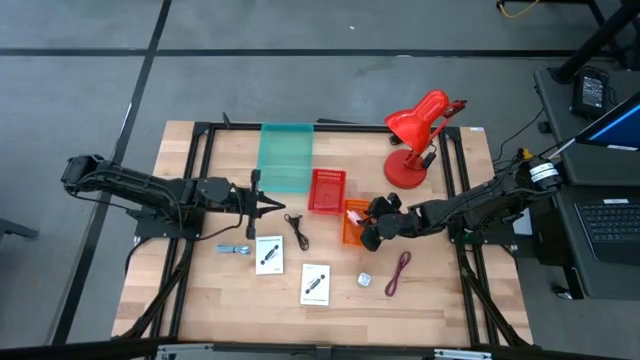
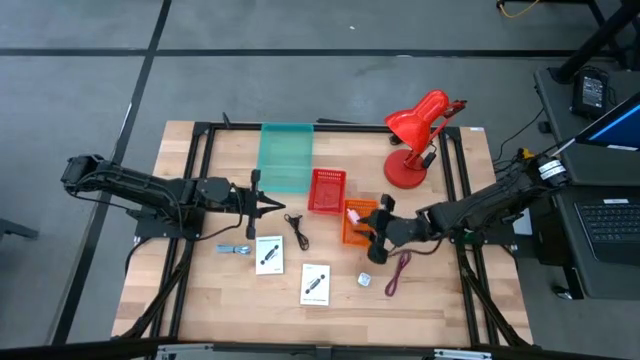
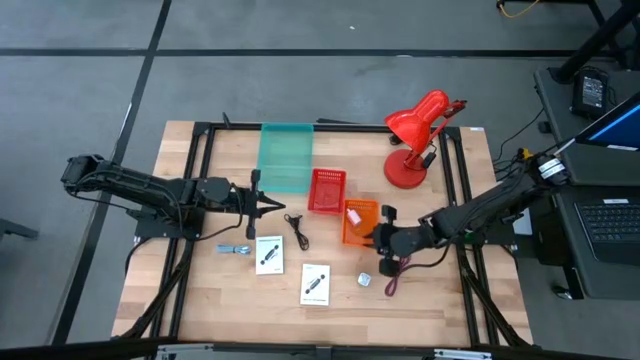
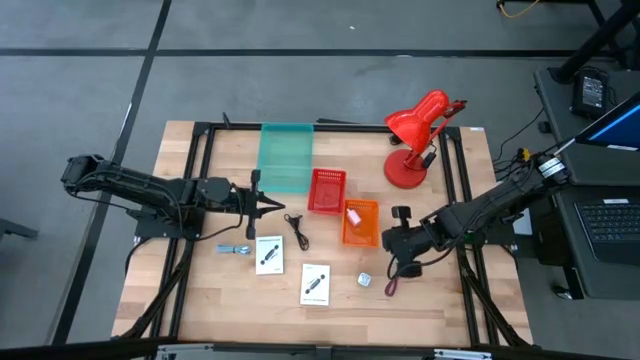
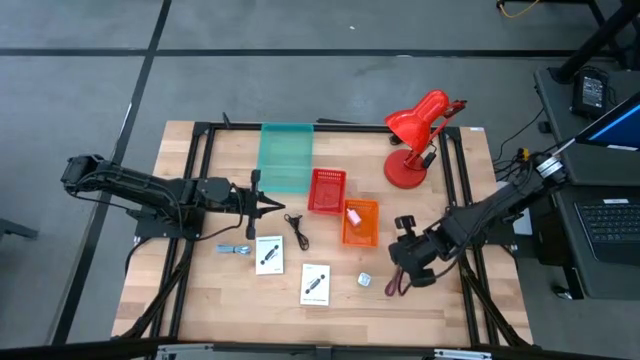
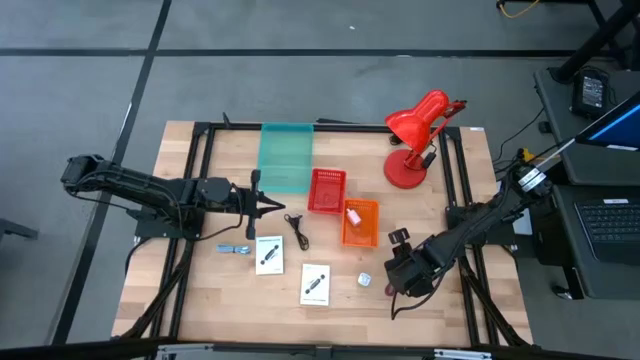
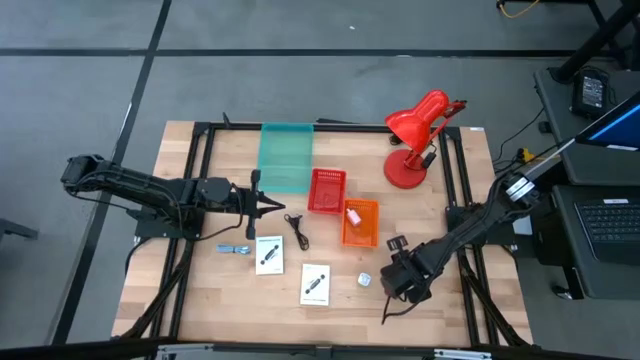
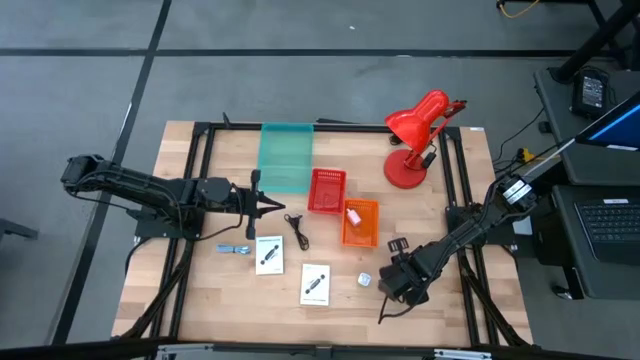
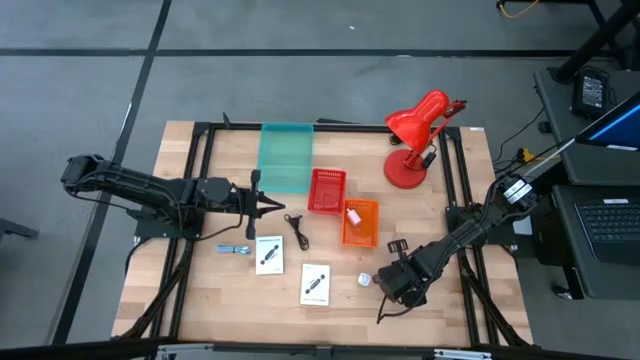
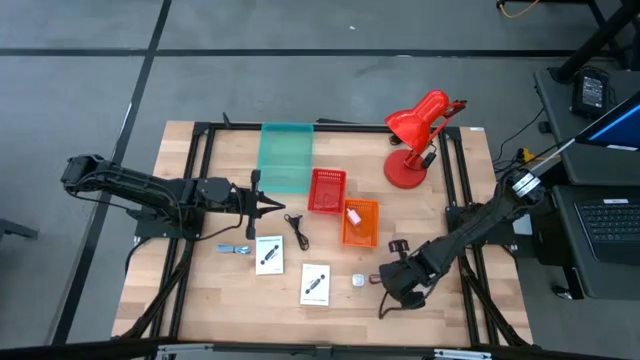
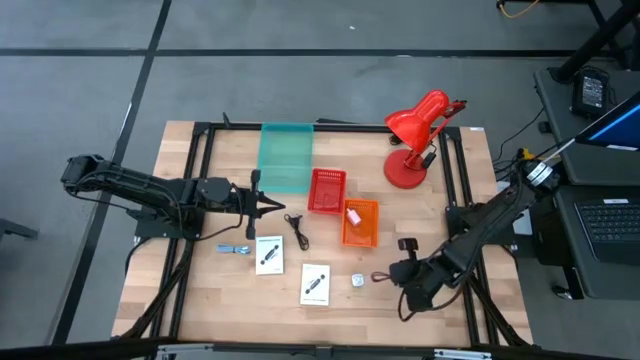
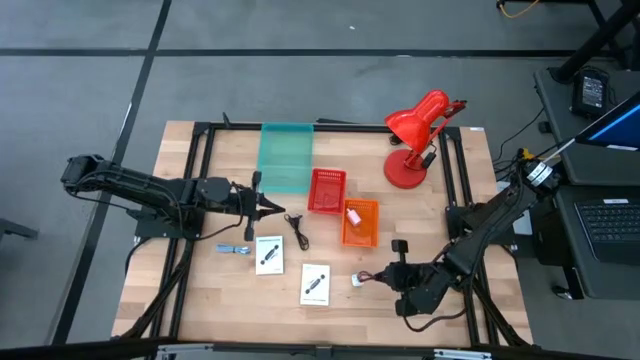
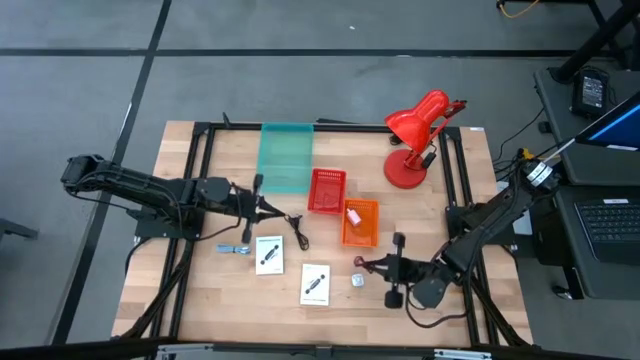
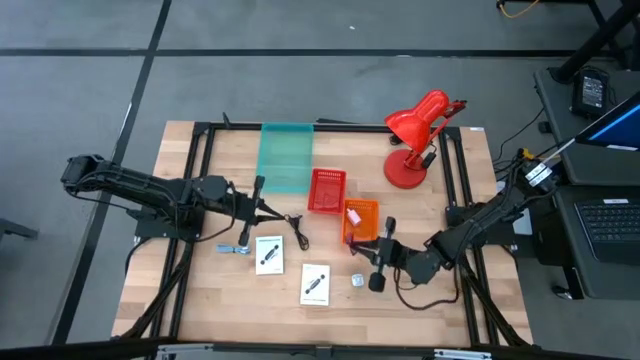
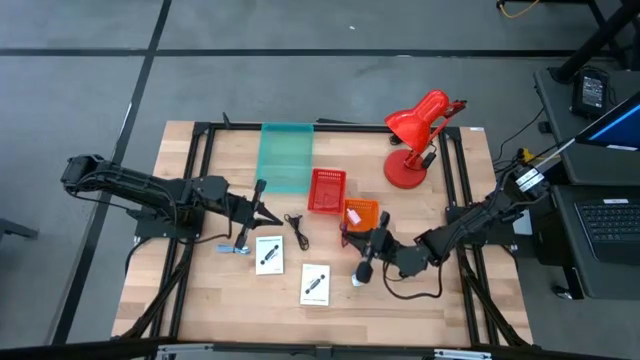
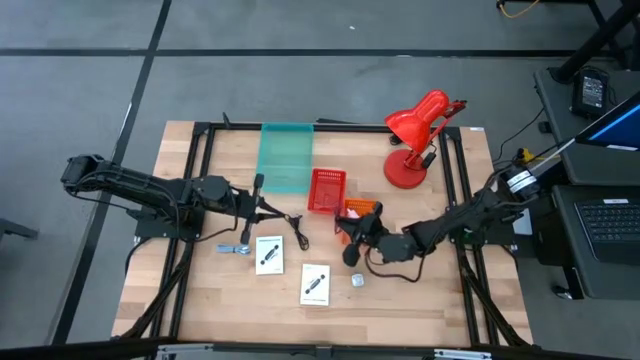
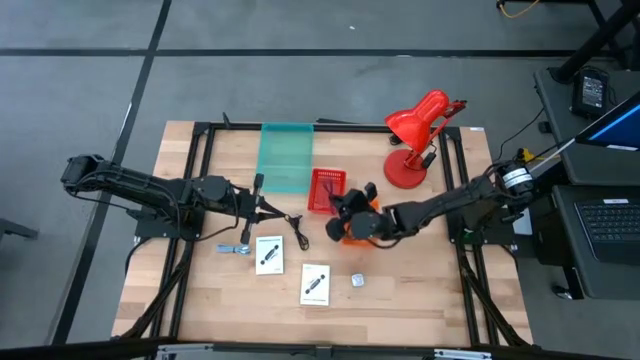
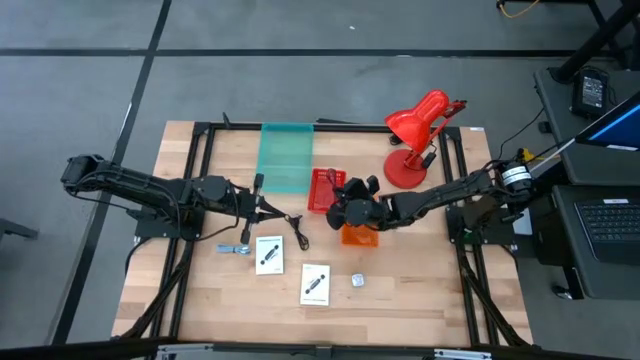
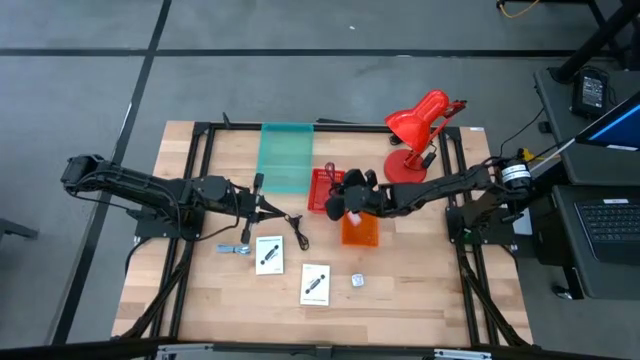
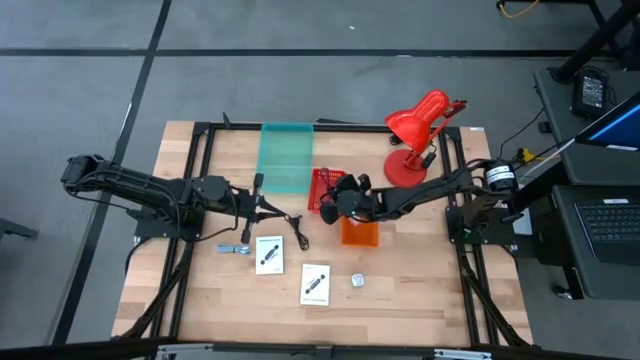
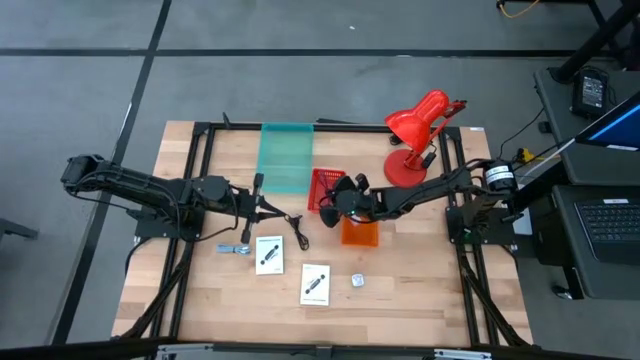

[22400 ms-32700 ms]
Task: Pick and place items into bin
Put the pink charger cable into the red basket

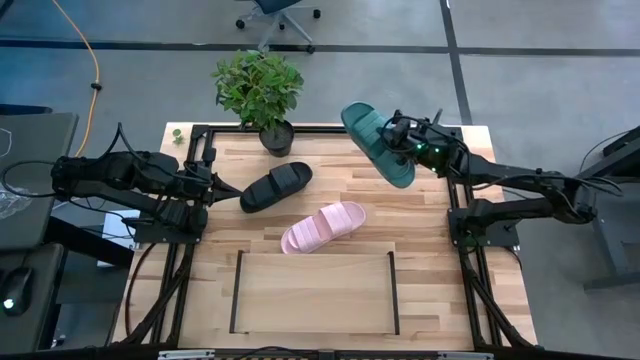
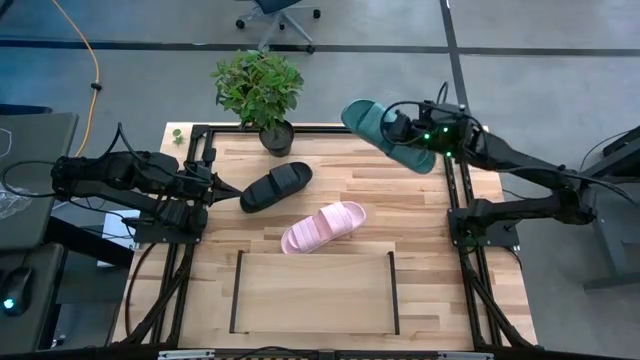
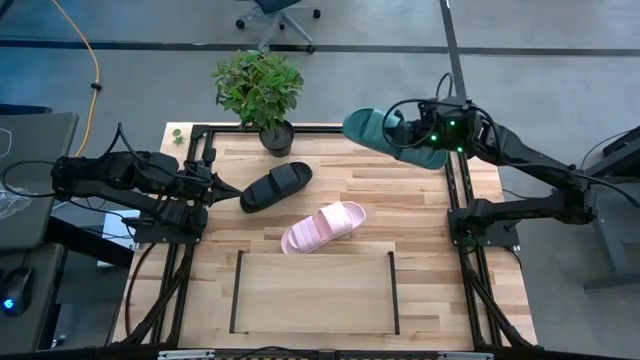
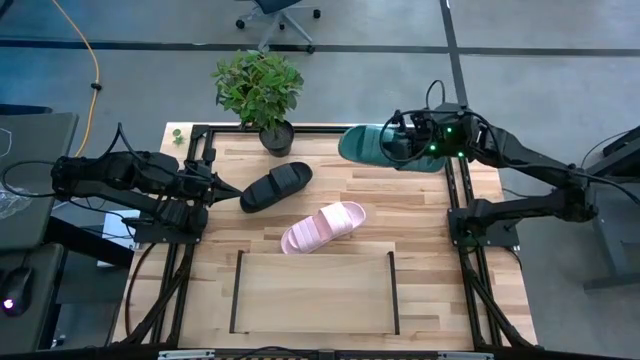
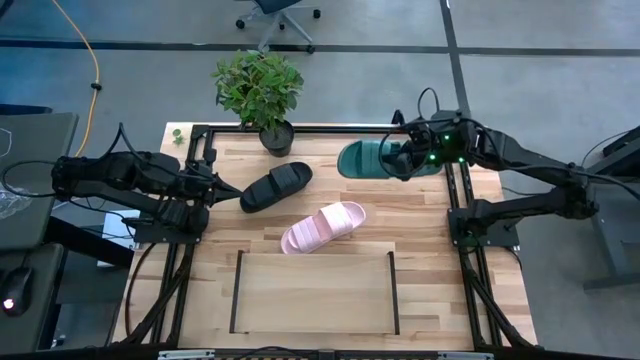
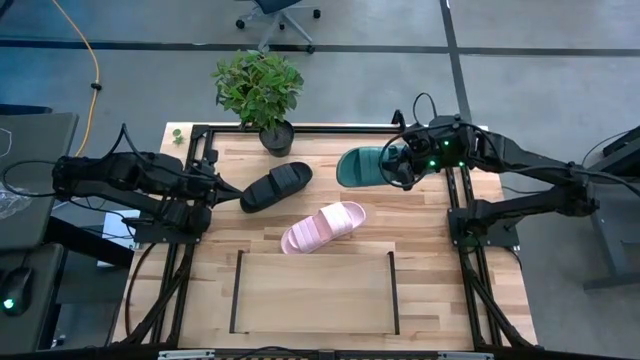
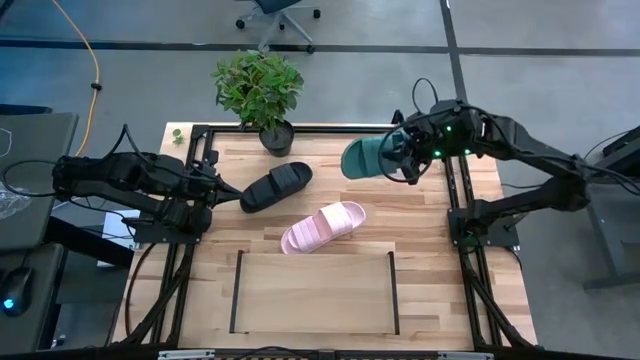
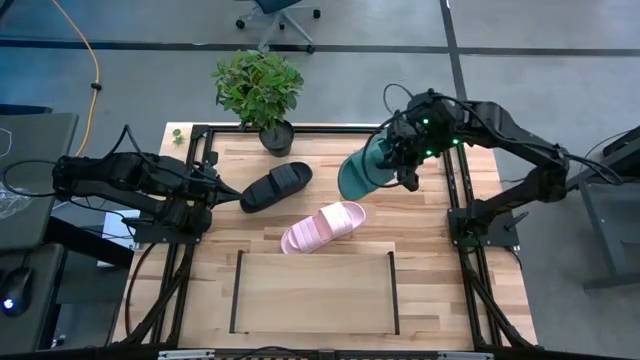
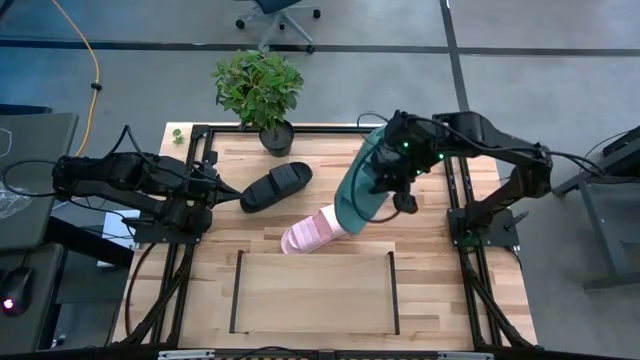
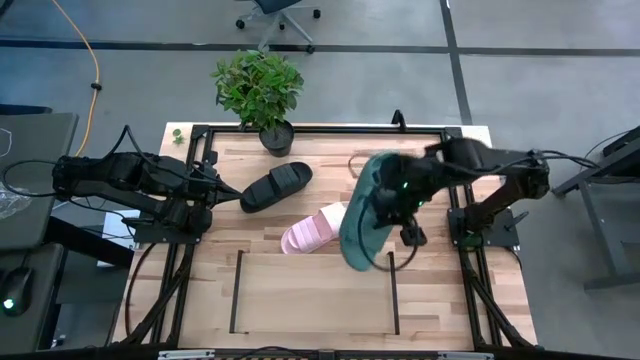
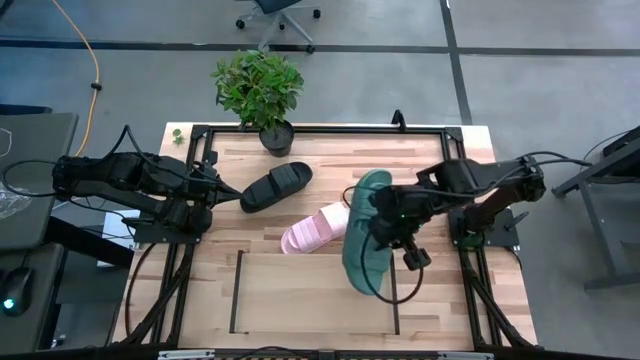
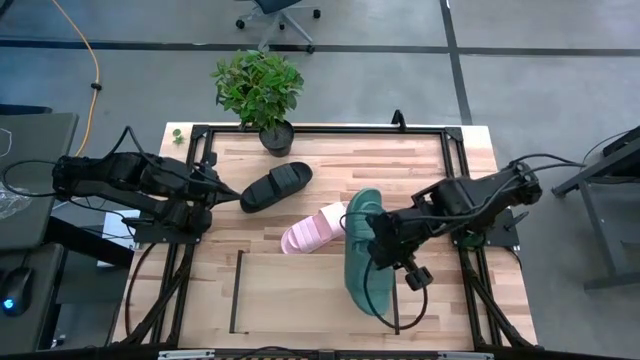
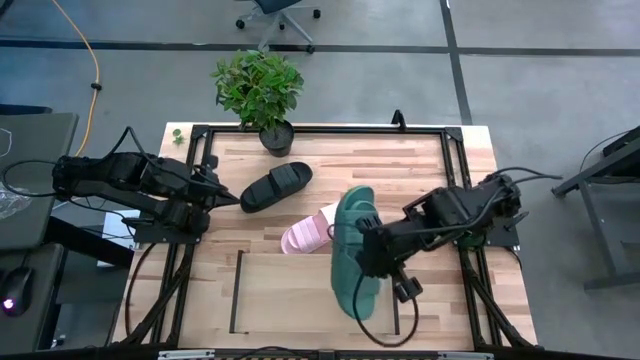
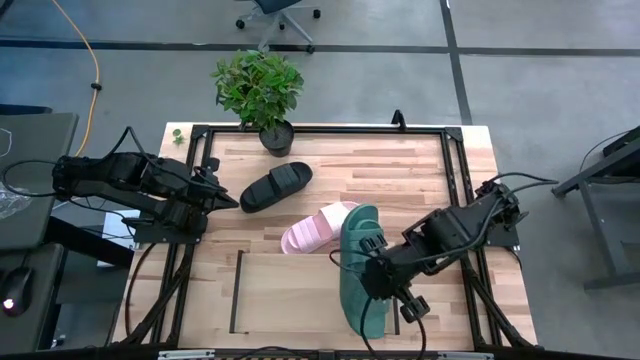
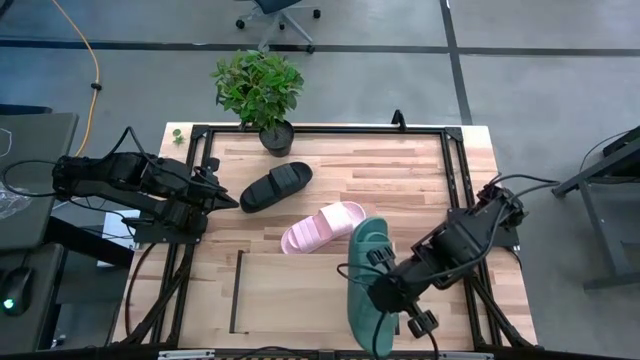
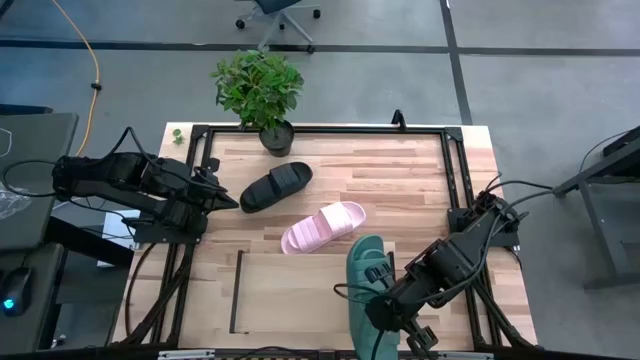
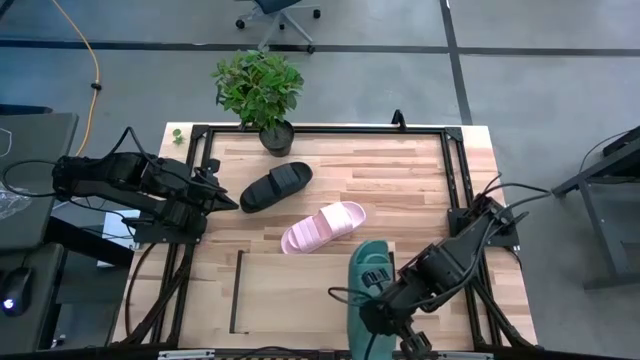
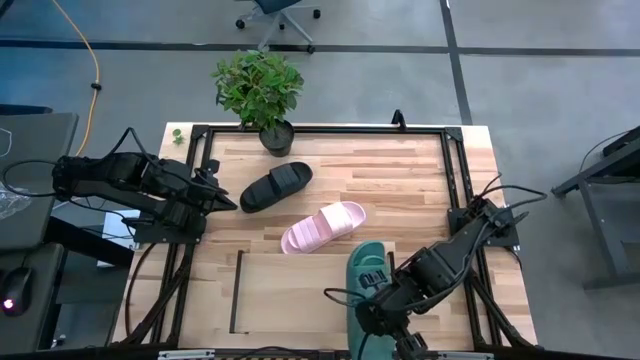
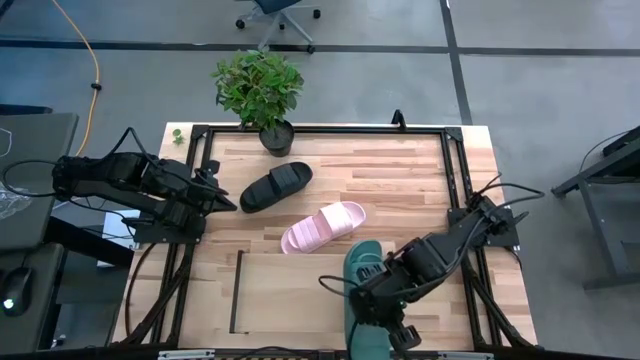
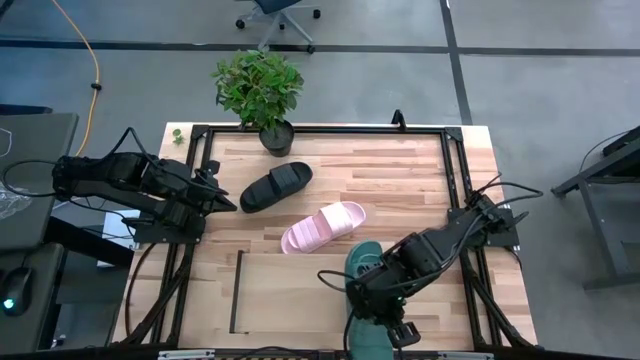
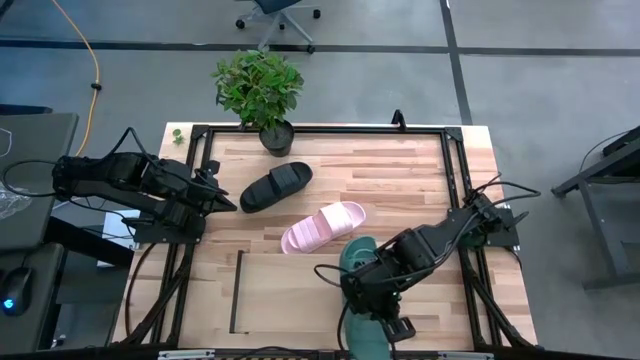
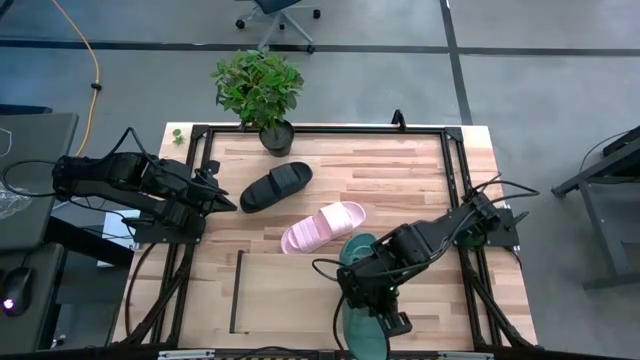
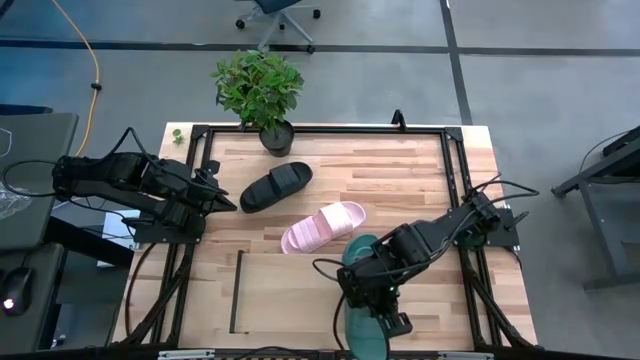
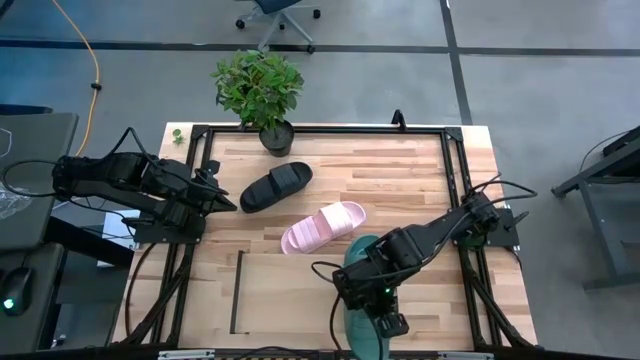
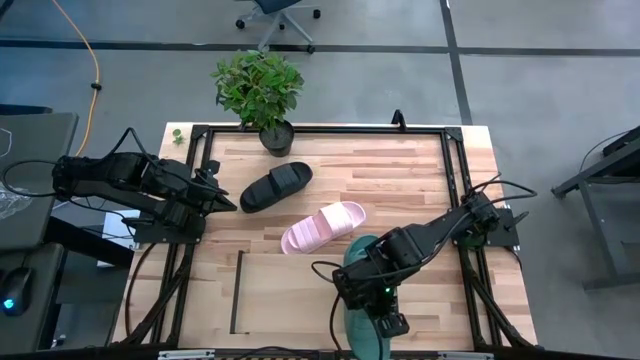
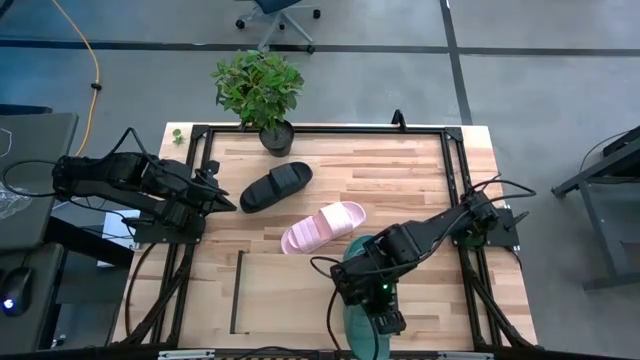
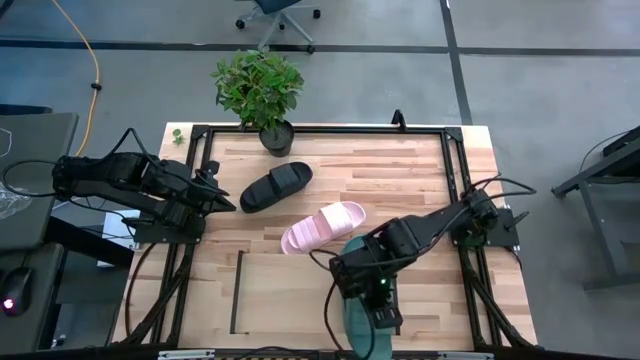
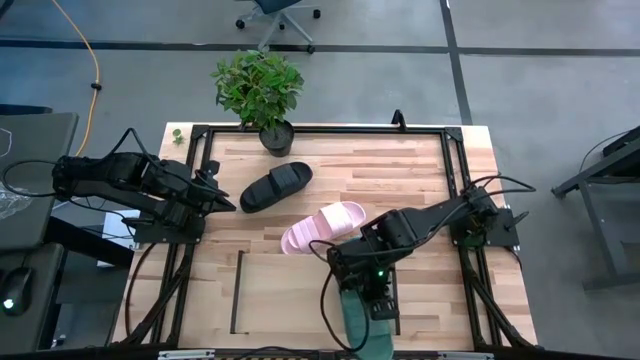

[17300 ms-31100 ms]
Task: Pick and place slides into the shelf
Put the green pair of slides on the shelf
